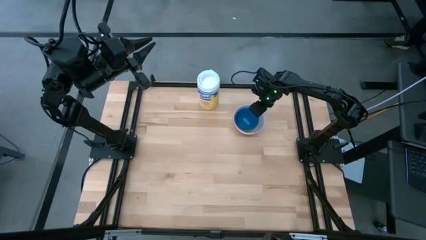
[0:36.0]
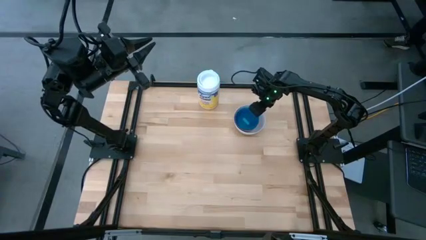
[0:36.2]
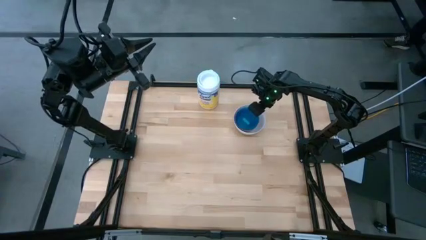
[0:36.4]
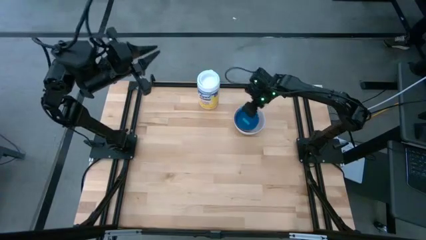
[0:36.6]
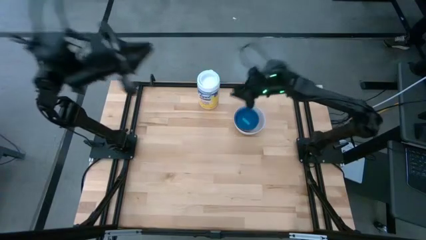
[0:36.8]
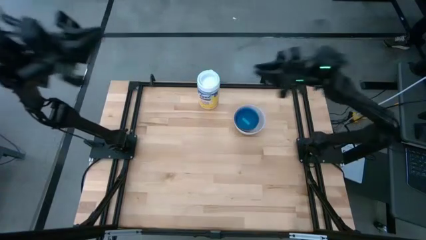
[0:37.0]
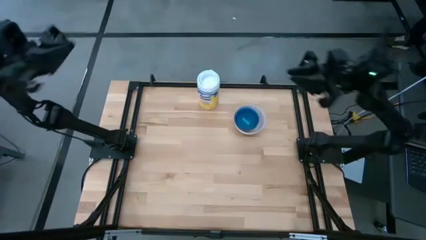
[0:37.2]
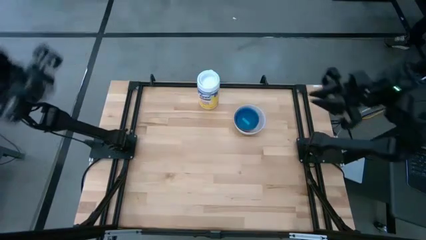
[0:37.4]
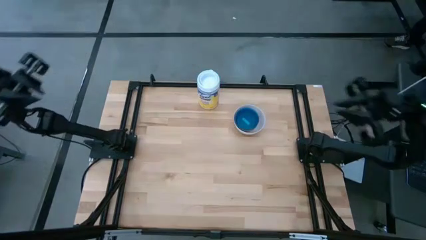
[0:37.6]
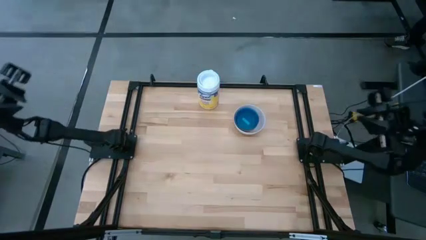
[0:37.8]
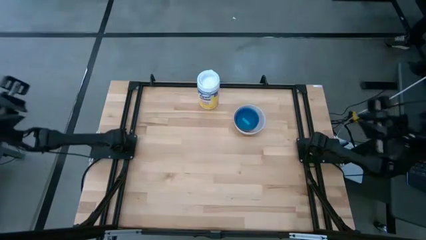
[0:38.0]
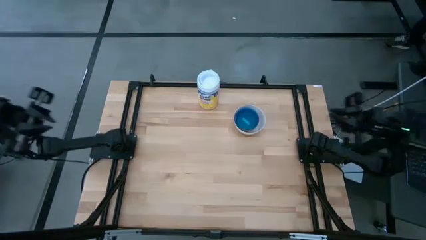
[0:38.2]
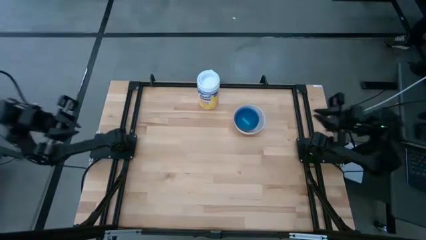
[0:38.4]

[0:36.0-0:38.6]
Return to Home Position

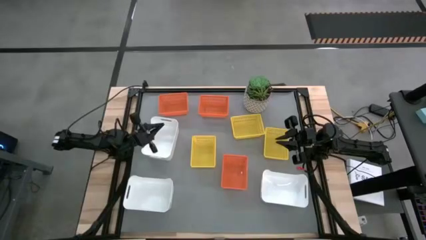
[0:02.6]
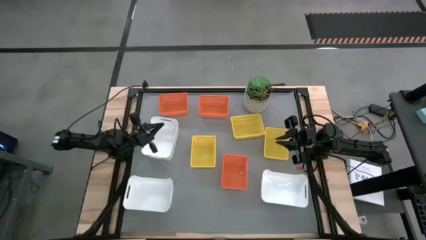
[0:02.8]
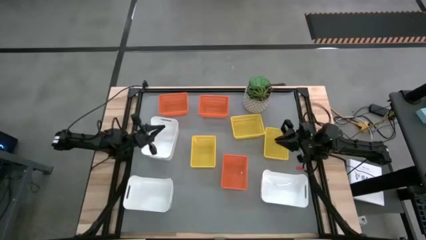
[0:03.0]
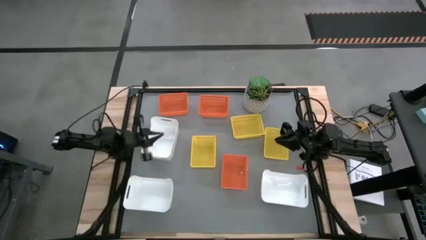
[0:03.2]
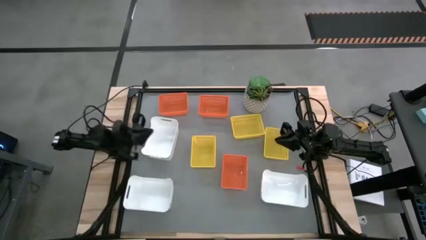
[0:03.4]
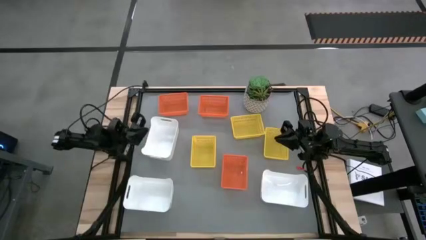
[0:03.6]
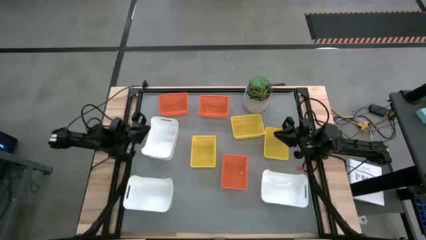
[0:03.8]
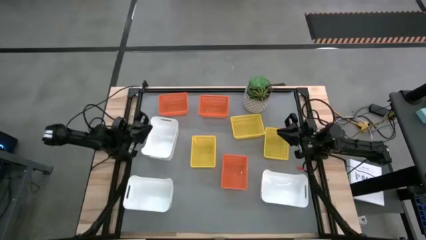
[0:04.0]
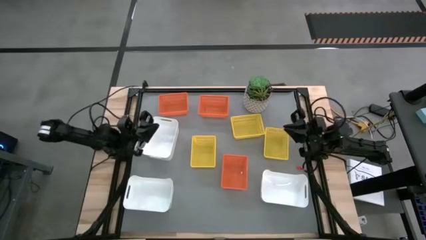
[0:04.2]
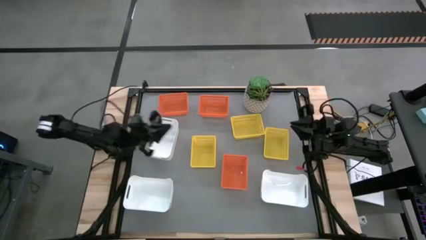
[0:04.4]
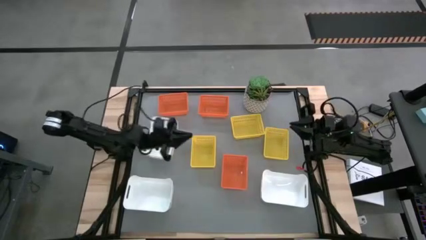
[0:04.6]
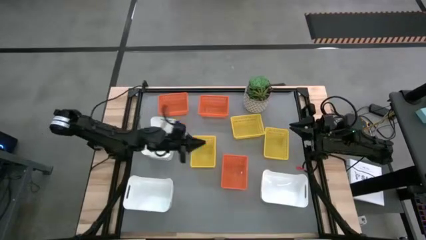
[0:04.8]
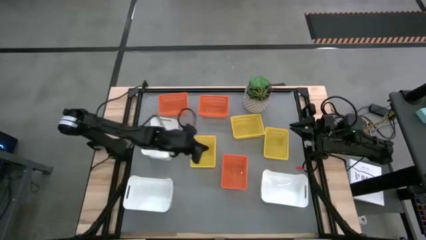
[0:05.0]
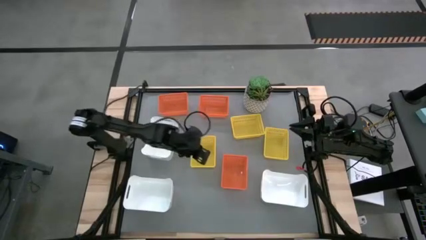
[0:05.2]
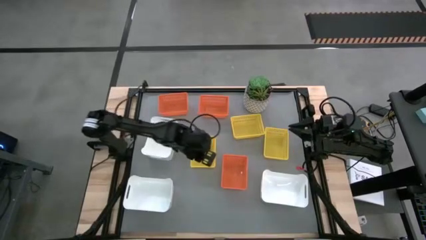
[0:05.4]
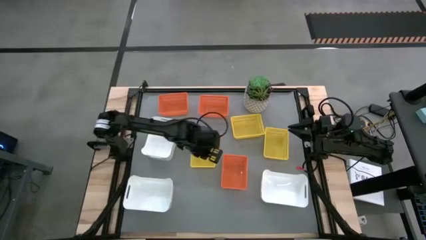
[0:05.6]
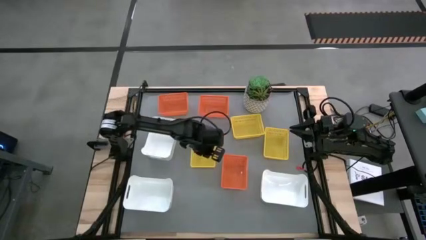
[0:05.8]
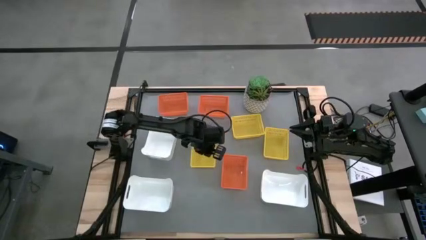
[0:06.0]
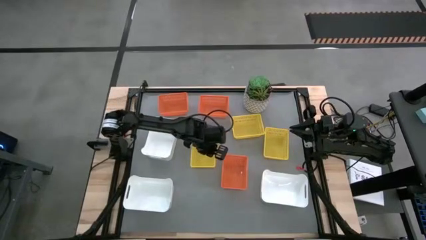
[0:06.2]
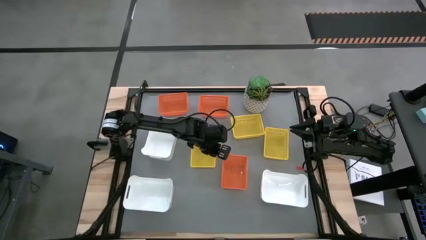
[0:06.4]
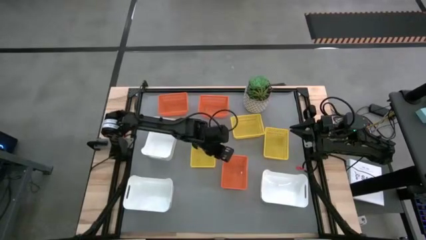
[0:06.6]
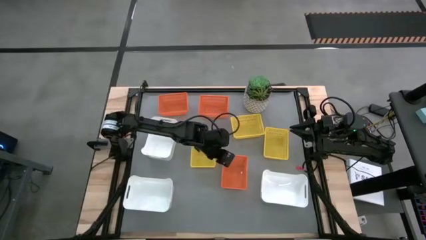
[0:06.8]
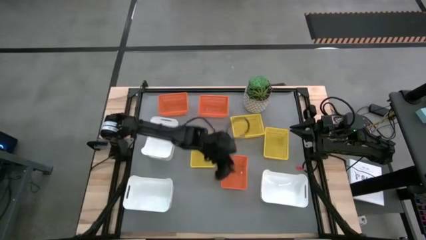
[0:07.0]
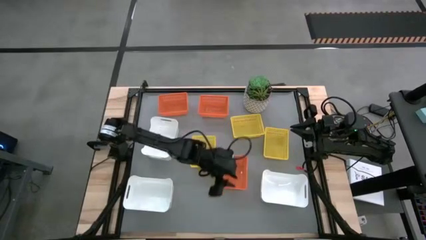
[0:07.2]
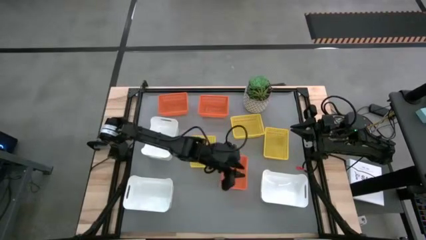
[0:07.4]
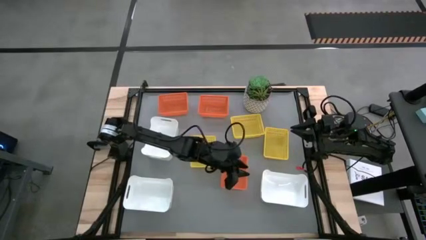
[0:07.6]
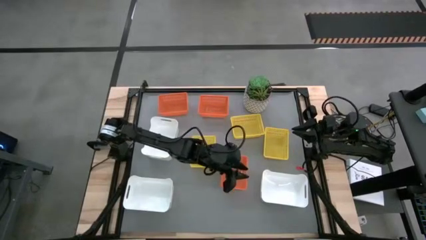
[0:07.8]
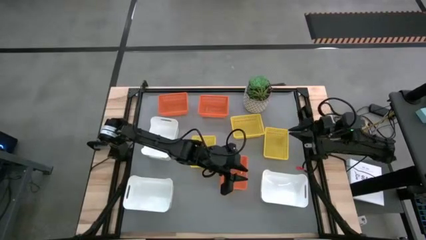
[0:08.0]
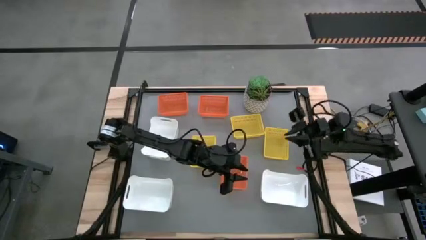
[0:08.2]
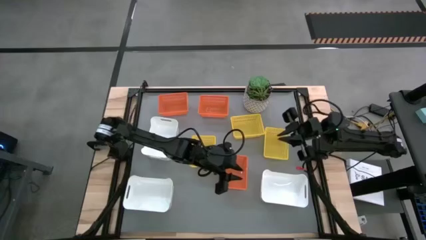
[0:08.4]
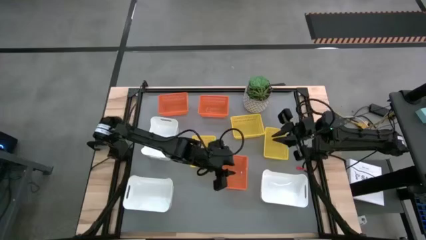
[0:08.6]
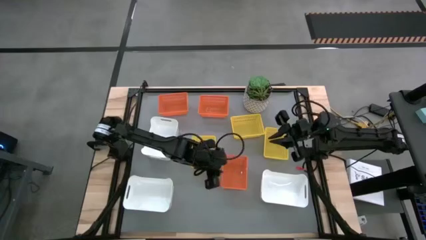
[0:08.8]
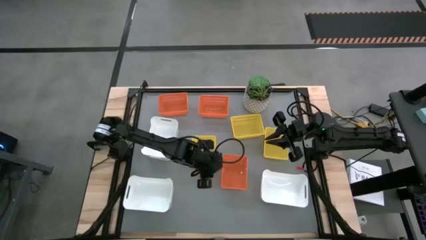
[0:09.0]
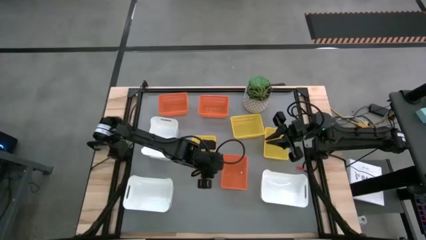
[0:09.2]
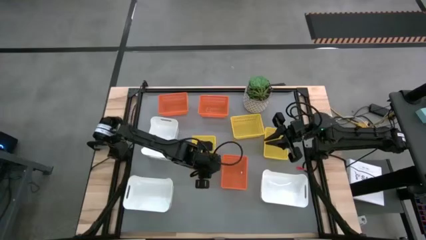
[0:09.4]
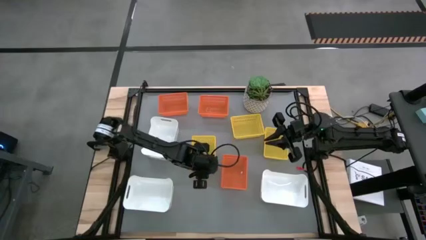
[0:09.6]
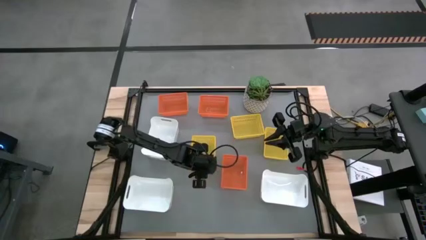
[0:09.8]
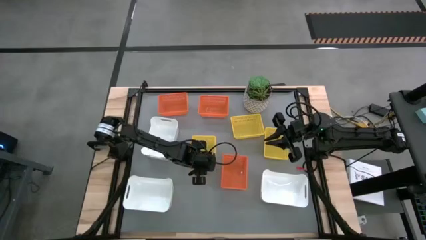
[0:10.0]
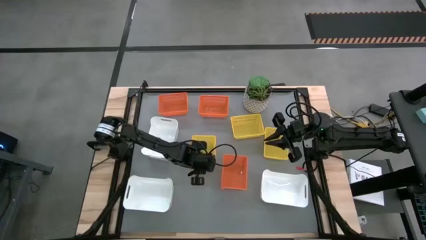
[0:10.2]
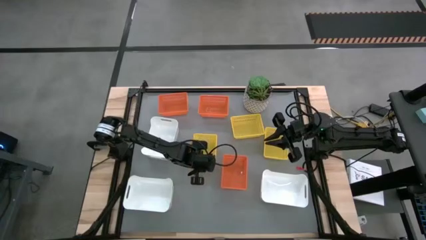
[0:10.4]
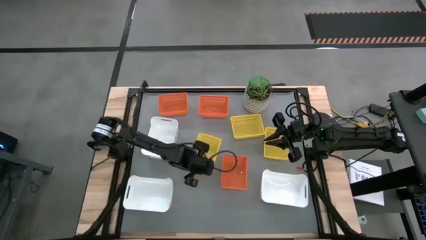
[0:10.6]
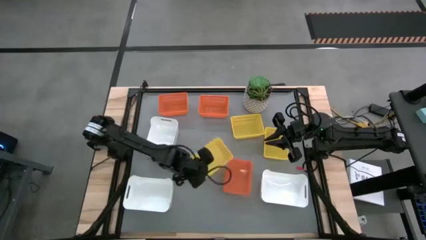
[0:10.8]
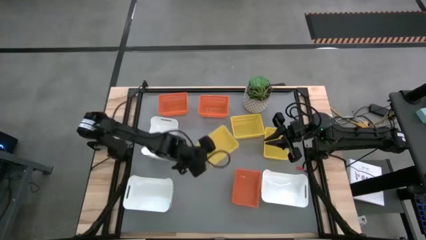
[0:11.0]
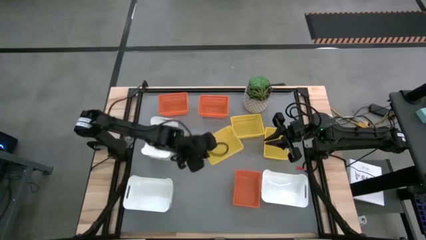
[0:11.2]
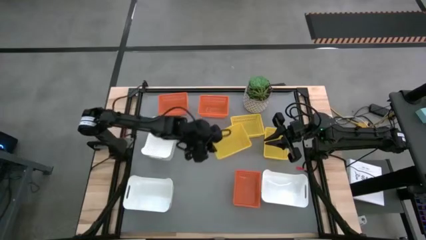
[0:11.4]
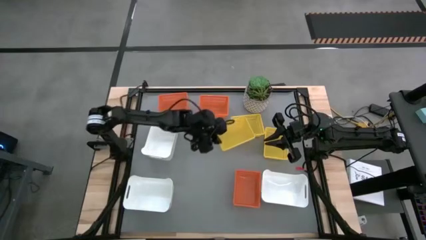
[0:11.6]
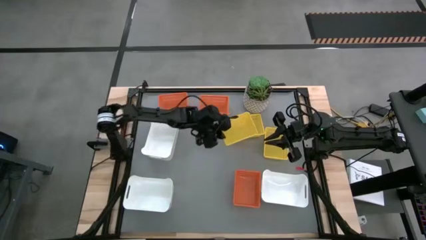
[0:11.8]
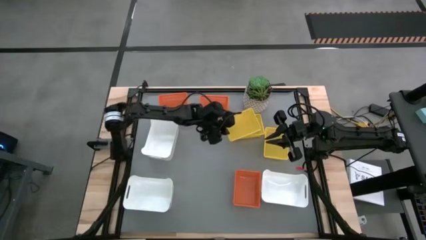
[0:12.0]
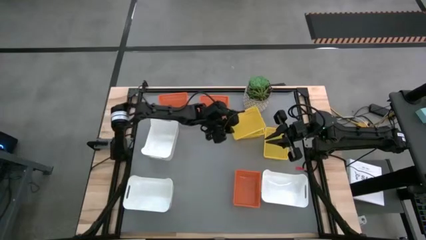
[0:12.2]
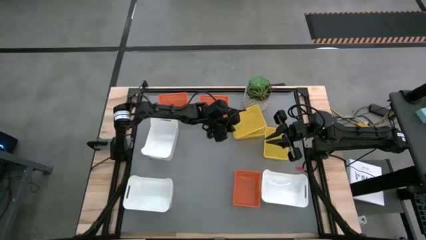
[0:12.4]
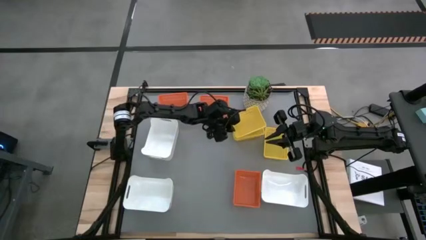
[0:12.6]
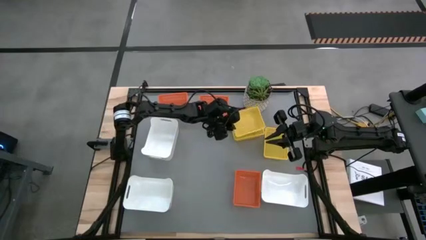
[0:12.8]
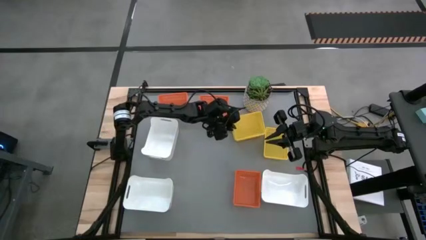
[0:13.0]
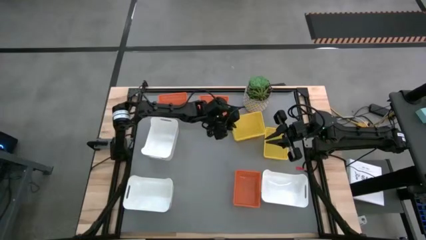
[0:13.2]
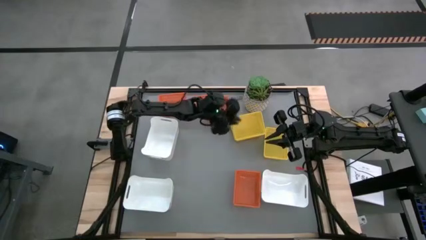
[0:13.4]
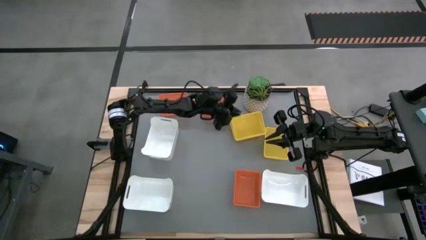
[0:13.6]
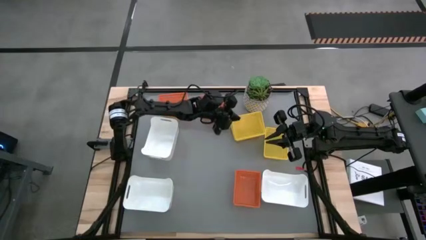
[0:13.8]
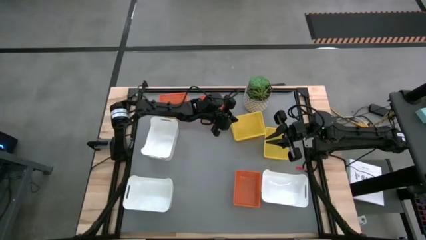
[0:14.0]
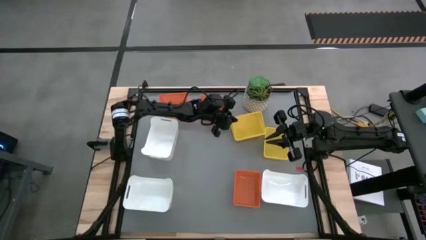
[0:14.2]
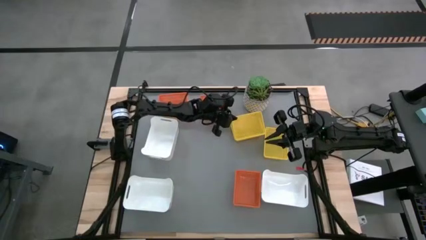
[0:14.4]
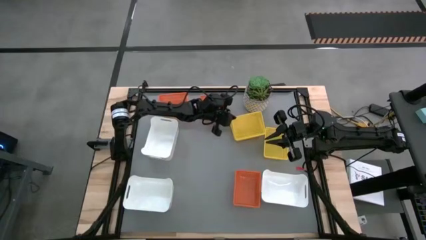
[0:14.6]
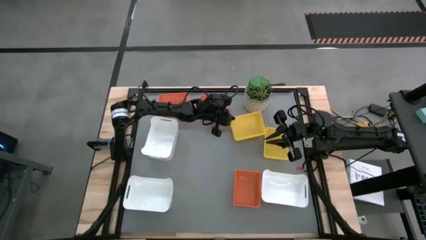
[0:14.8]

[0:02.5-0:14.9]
Stack the bottom left yellow bin on top of the top yellow bin
